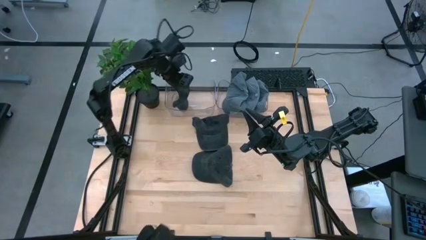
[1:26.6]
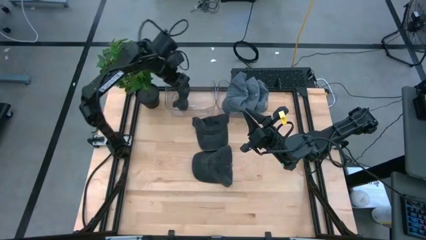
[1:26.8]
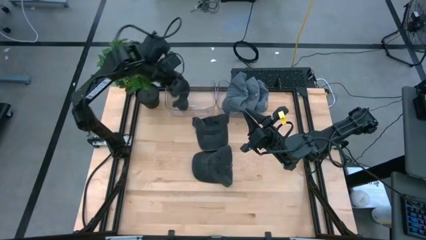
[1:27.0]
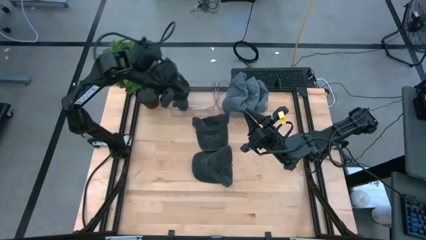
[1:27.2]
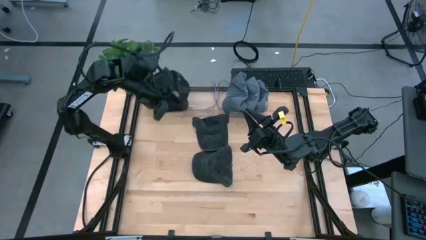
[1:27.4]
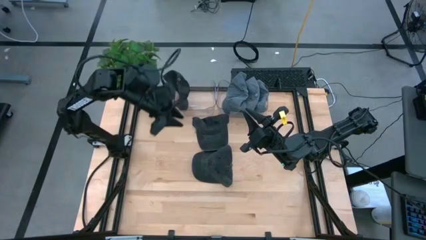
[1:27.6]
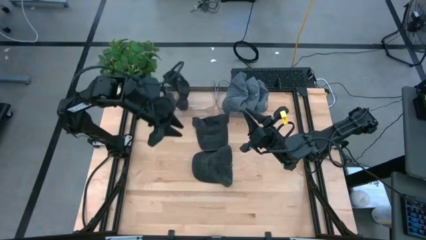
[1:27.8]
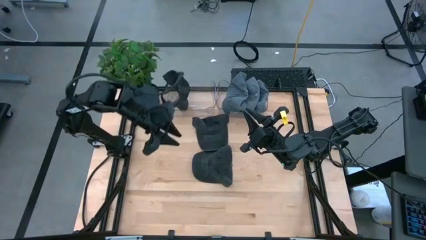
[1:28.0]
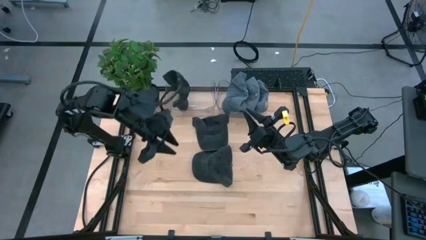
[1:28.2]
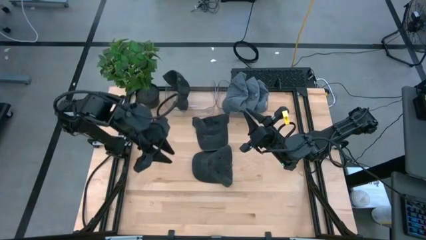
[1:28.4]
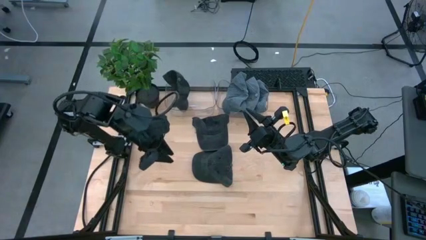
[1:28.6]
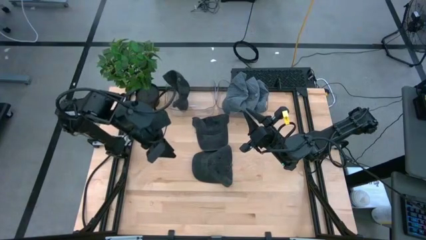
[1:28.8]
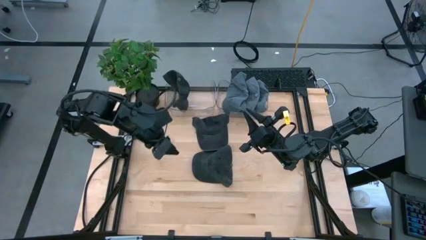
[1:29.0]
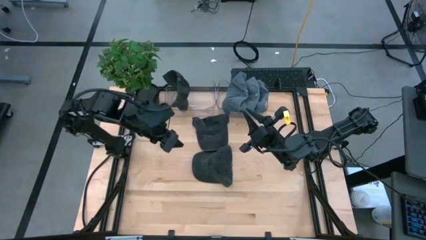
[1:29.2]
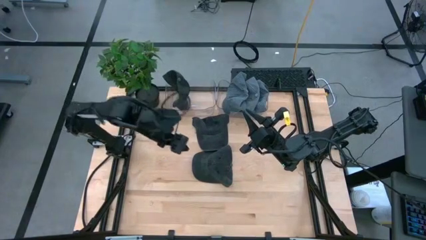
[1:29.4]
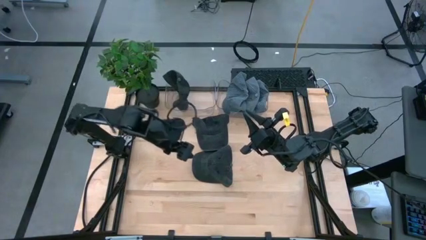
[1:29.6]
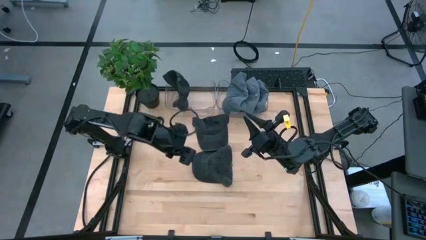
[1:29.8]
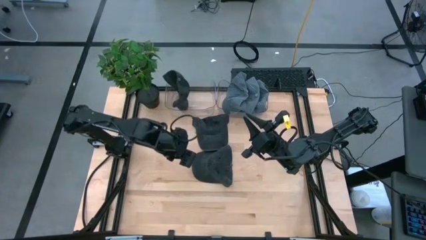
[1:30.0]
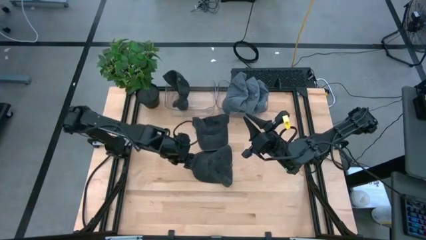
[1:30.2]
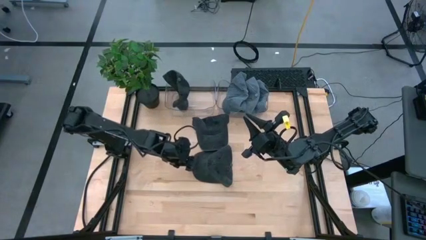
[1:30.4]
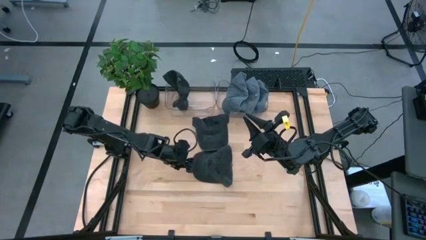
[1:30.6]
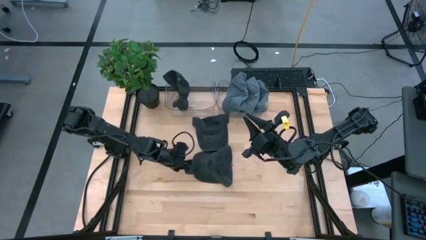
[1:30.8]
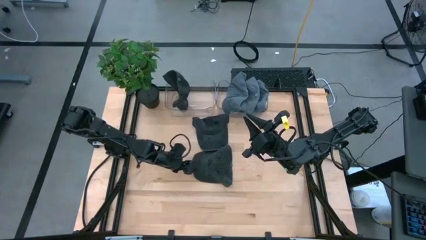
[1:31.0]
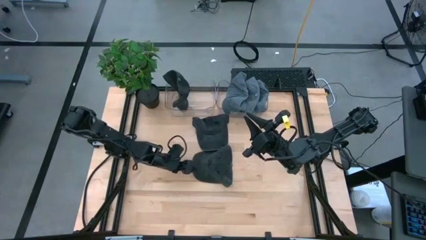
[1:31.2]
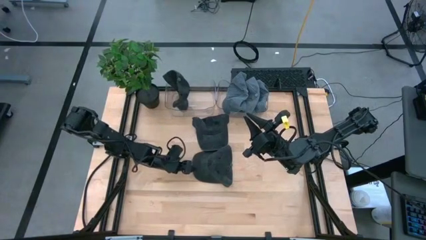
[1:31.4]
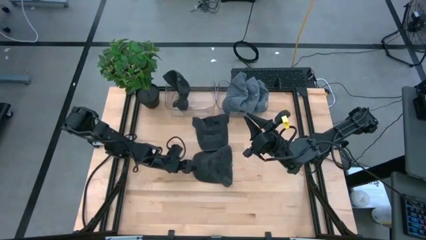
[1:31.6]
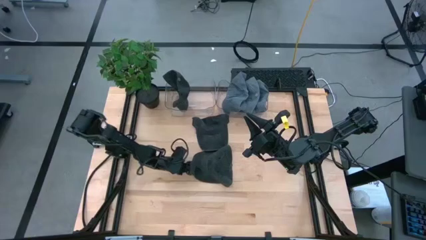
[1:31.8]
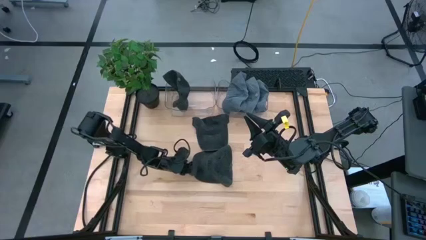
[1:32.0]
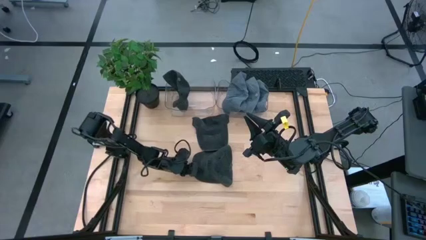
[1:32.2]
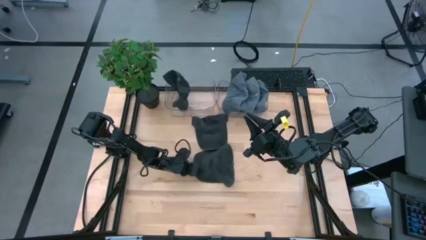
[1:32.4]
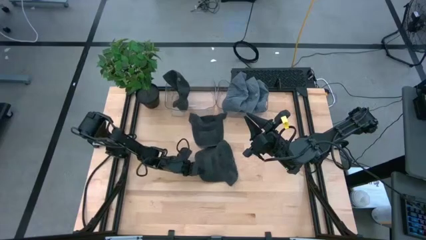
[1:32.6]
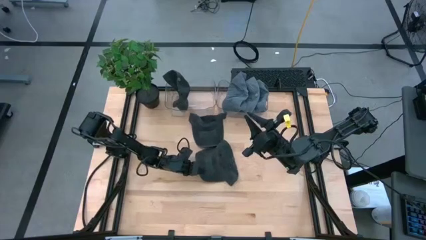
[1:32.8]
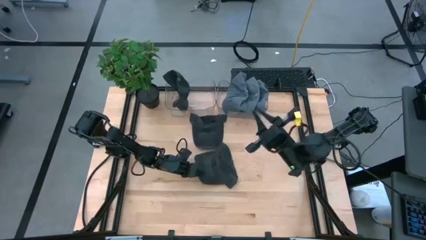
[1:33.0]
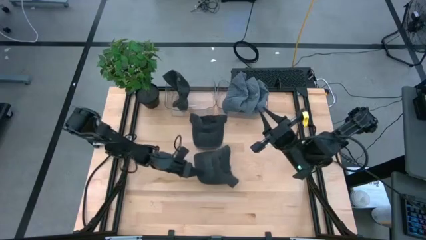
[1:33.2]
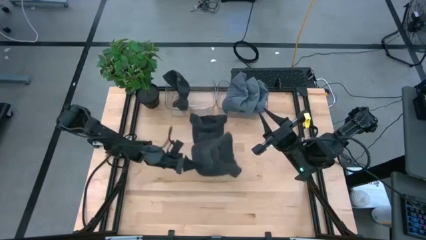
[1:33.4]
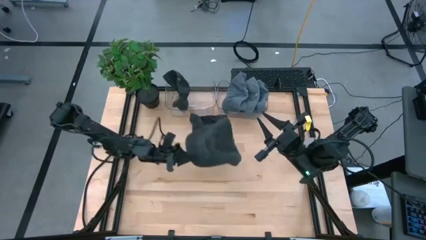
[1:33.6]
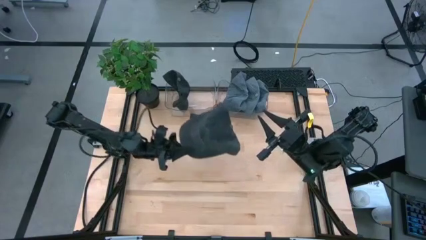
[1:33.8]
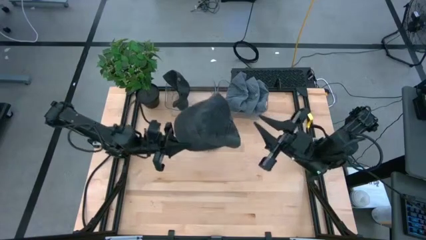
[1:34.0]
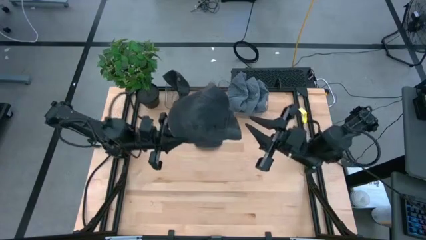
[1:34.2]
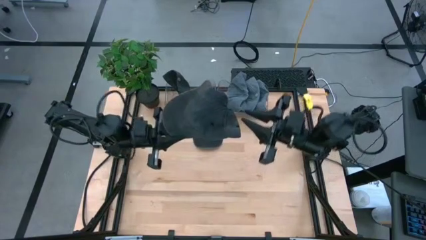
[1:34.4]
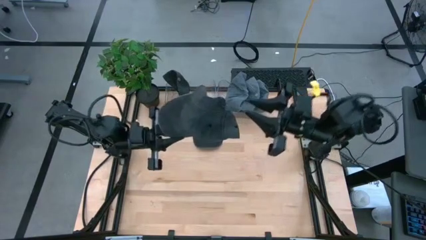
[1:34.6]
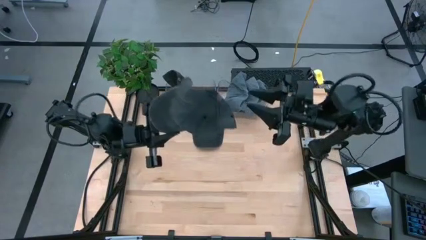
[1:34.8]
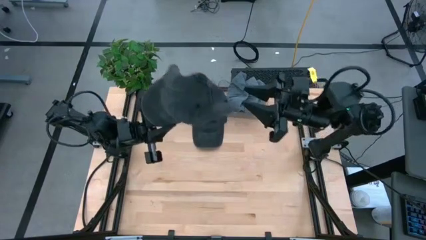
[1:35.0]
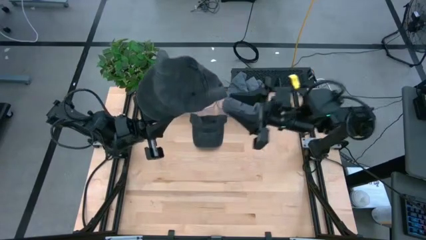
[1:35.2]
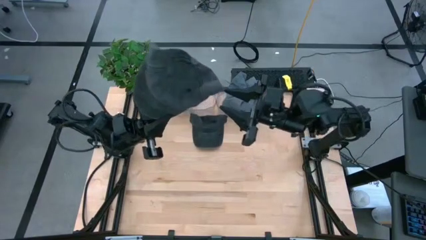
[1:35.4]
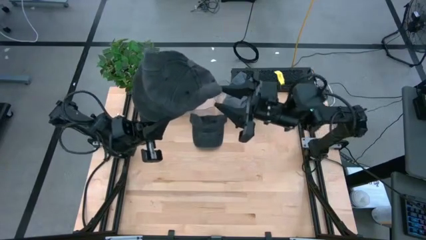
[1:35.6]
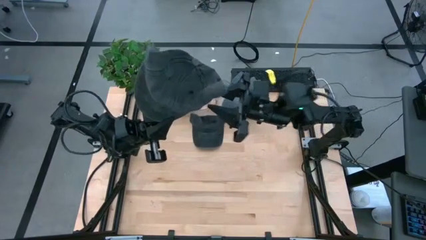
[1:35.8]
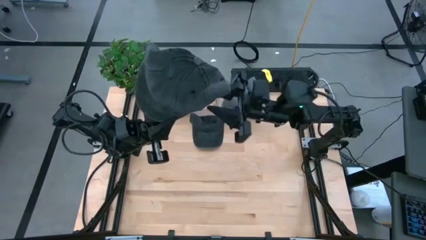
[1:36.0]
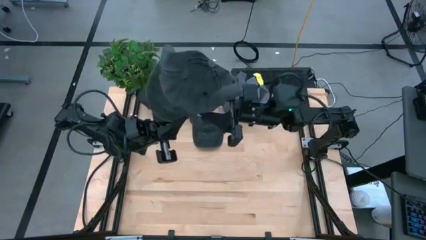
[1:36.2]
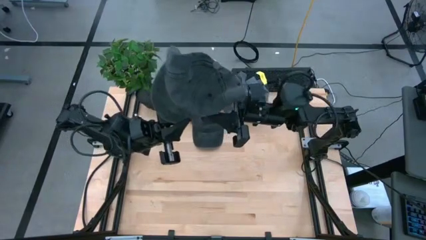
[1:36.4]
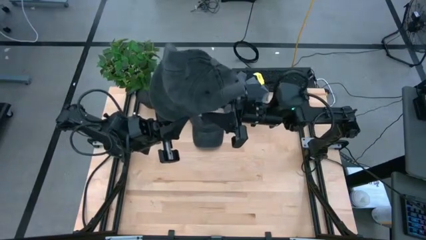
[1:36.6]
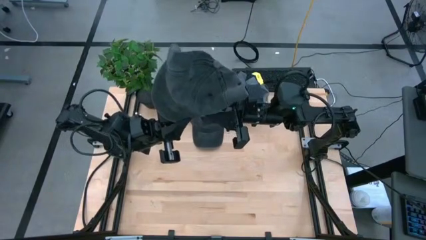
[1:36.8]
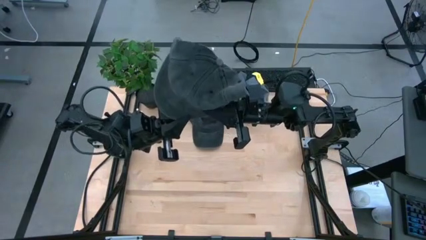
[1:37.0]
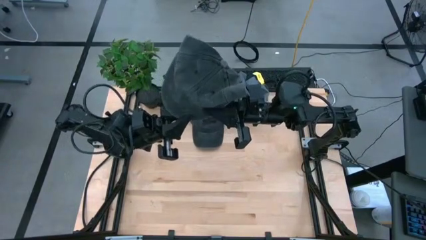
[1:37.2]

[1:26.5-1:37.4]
Task: Pick & Place hat
Put the bottom black cap into the left transparent bin

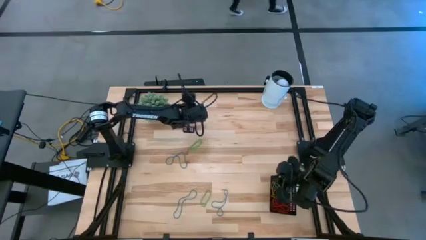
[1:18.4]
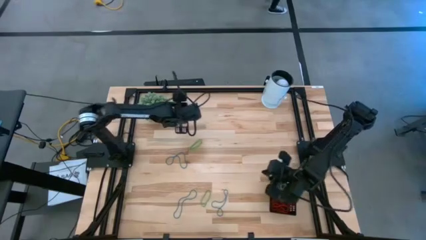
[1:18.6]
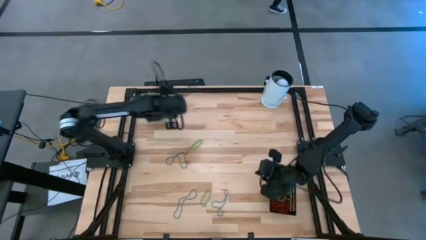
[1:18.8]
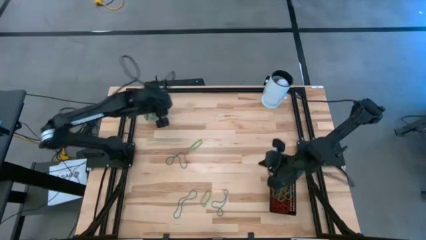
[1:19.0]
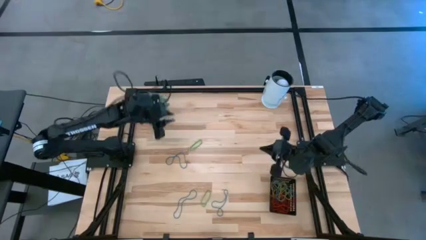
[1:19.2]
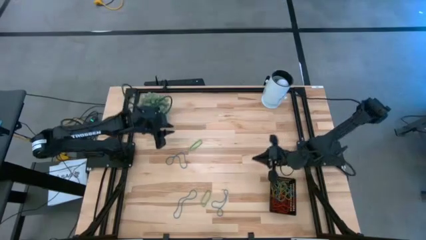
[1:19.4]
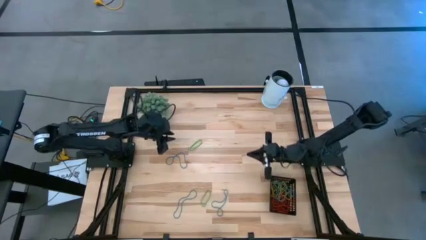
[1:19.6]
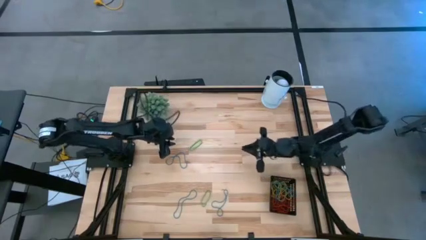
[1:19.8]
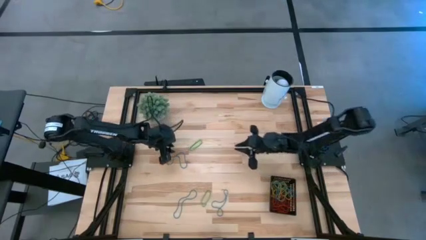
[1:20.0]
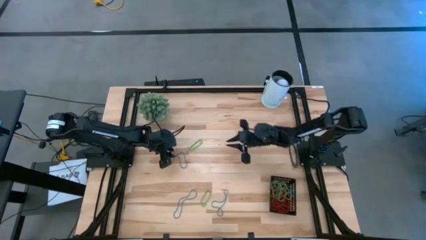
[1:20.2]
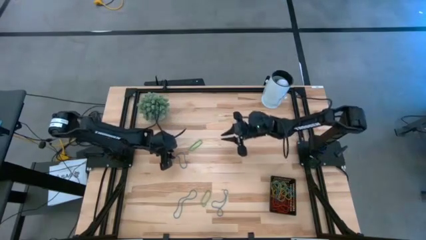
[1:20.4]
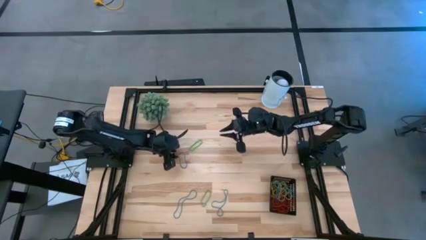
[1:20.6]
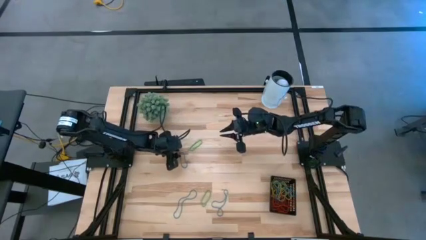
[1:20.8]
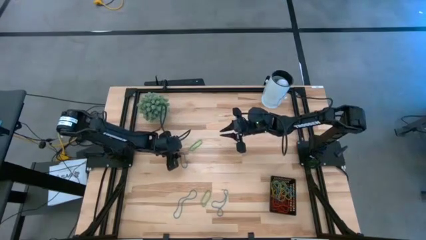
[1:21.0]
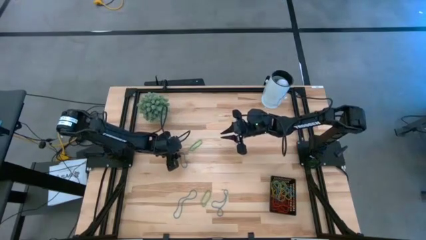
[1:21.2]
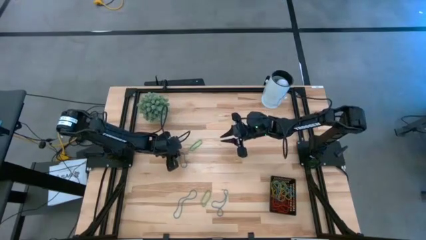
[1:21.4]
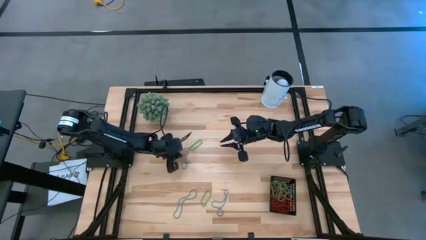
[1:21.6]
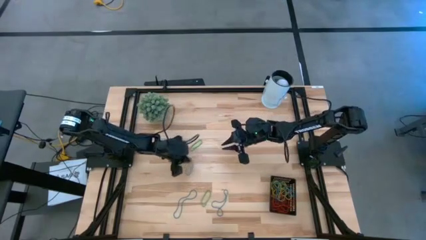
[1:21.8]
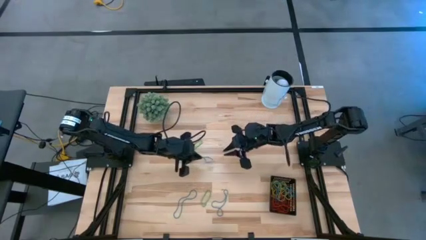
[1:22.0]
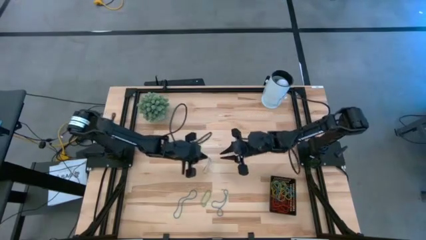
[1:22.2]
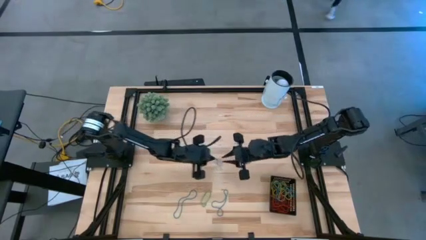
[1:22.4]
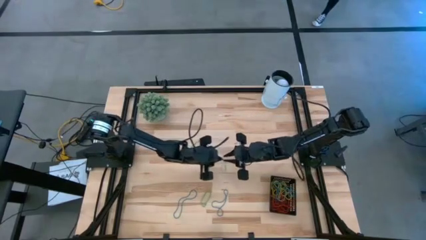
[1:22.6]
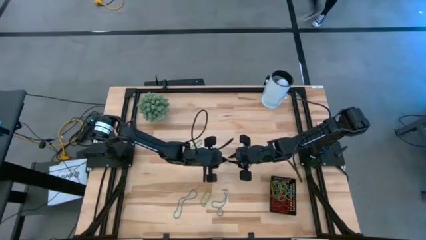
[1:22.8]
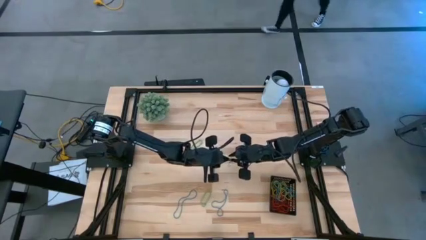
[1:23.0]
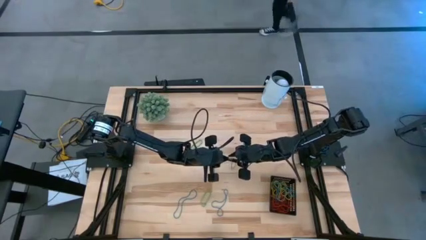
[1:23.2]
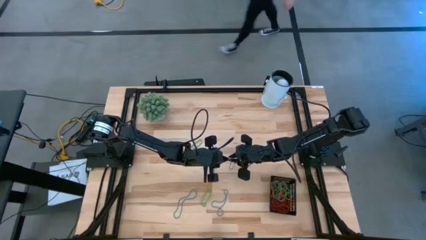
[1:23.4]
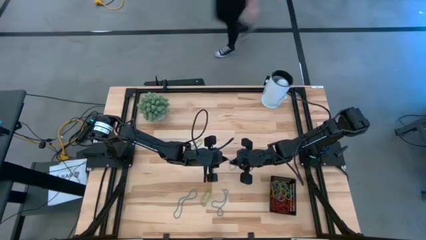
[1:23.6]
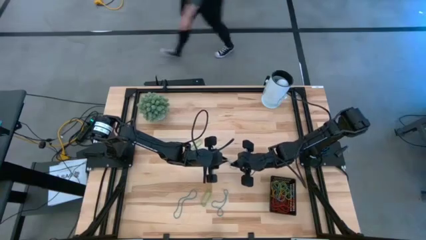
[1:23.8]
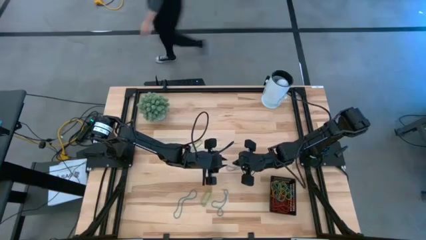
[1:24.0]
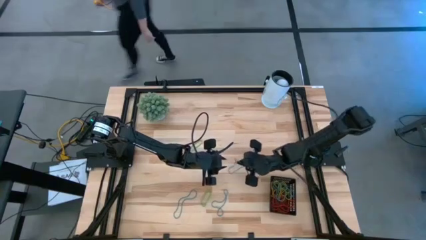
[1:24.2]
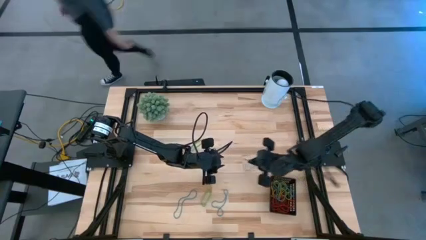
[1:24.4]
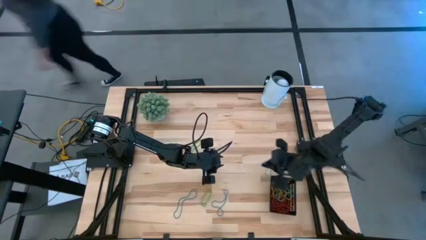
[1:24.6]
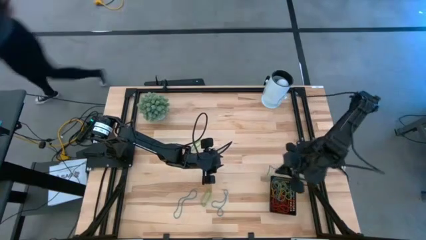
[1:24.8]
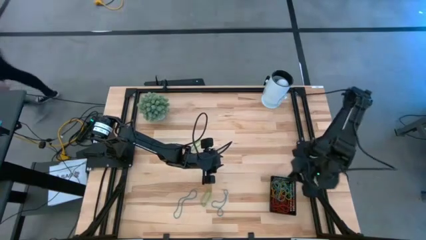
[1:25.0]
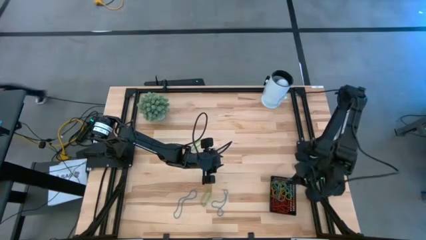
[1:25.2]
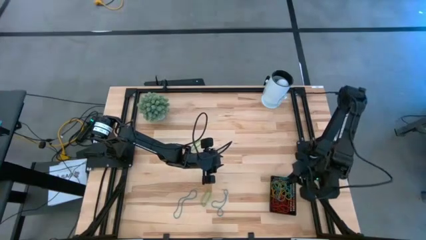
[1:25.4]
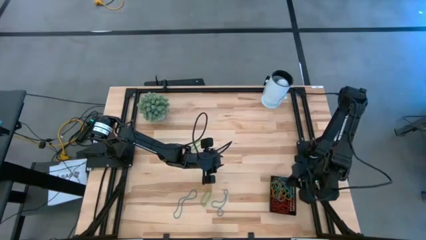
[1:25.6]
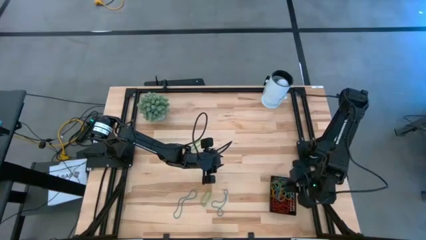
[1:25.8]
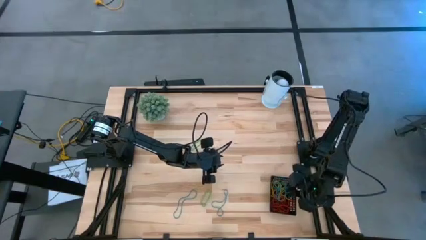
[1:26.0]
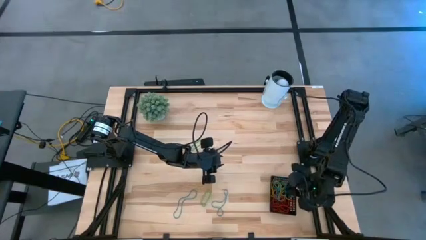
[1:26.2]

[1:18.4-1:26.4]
Task: Pick and place items into bin
Put the top left blue rubberband into the black basket
